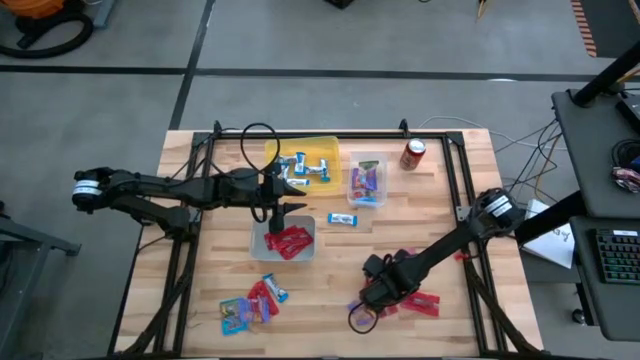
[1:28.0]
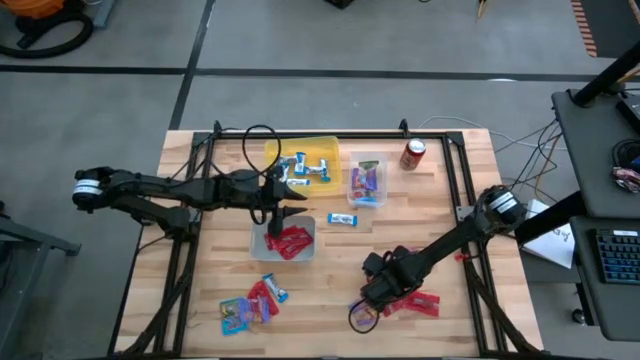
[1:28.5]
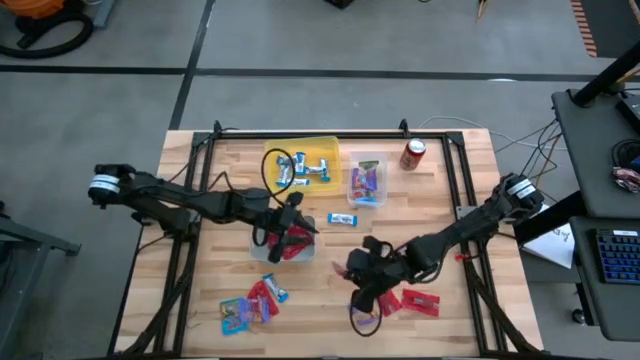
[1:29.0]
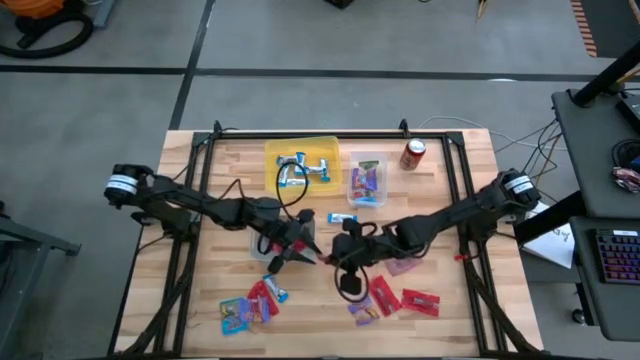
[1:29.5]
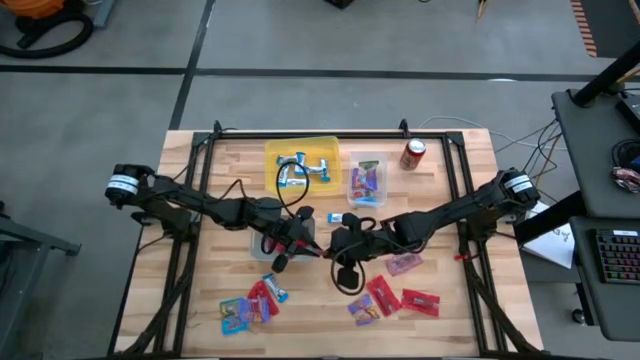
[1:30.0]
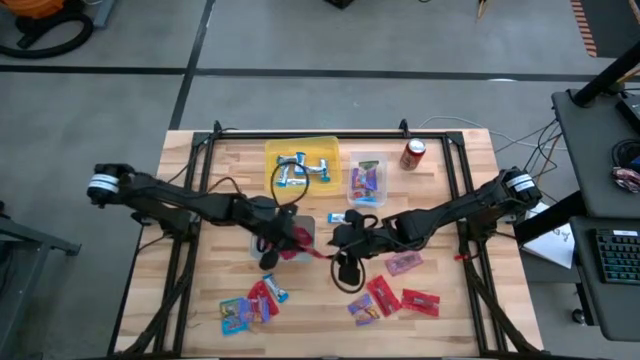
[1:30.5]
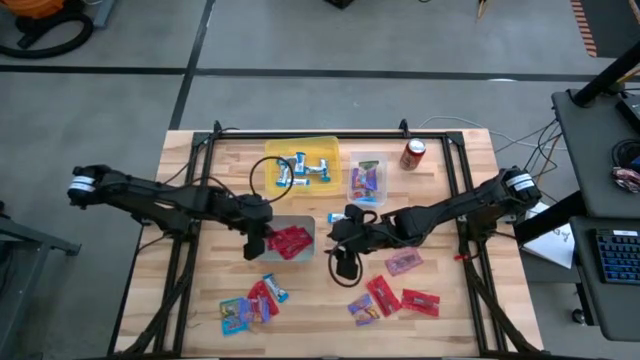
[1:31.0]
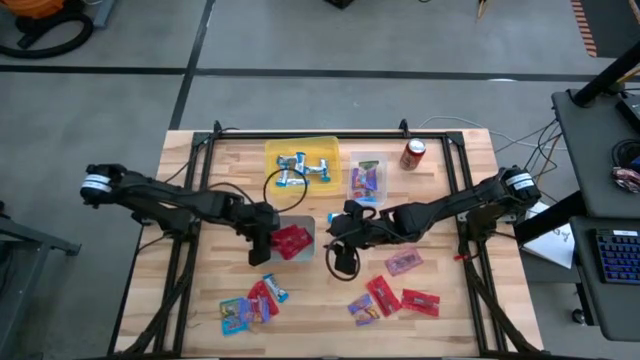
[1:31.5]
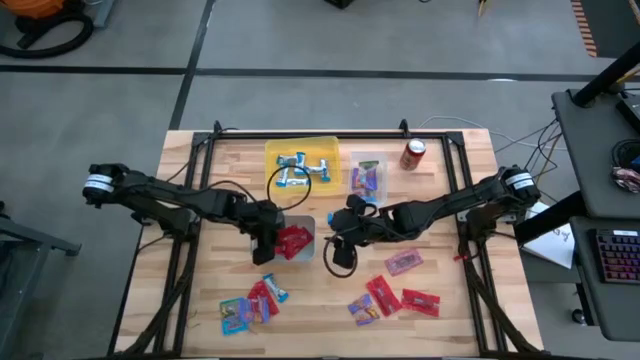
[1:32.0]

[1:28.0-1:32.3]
Task: Sort candy
Put the red candy into the gray bin

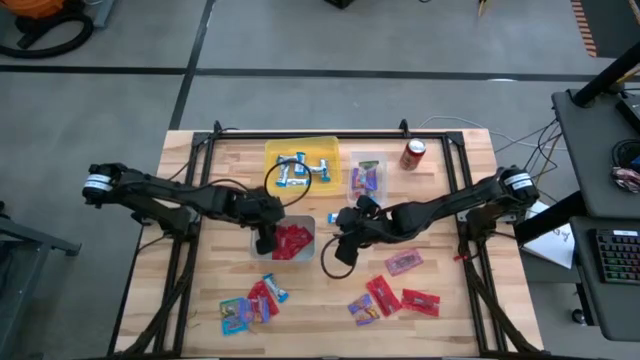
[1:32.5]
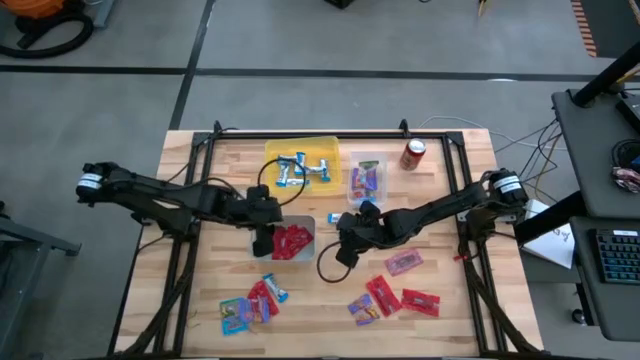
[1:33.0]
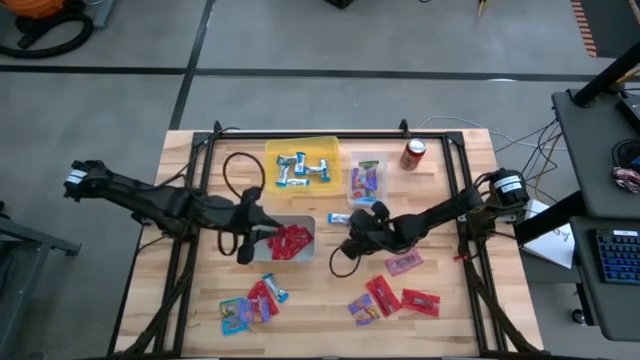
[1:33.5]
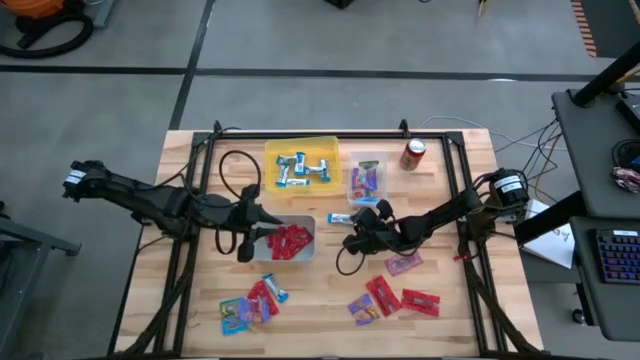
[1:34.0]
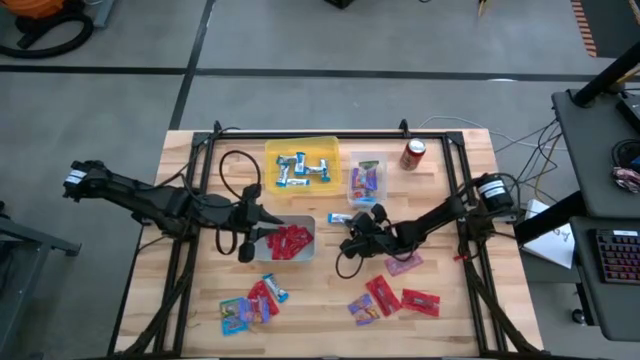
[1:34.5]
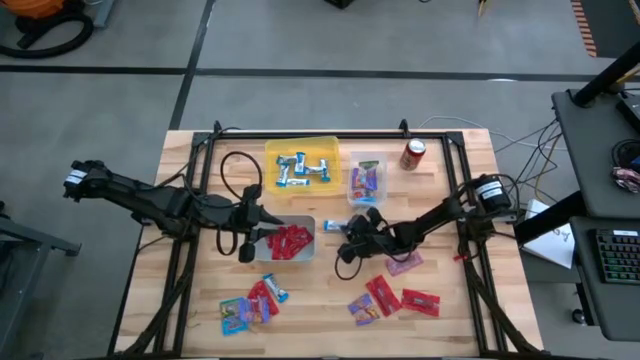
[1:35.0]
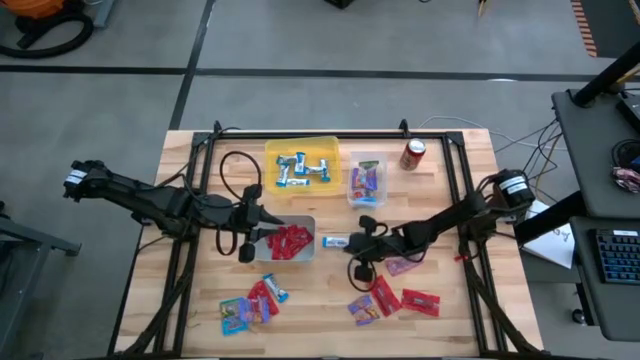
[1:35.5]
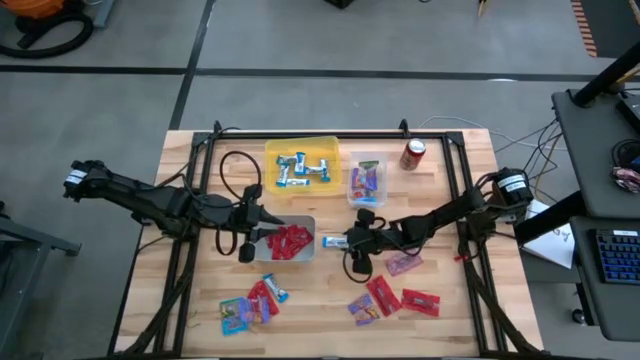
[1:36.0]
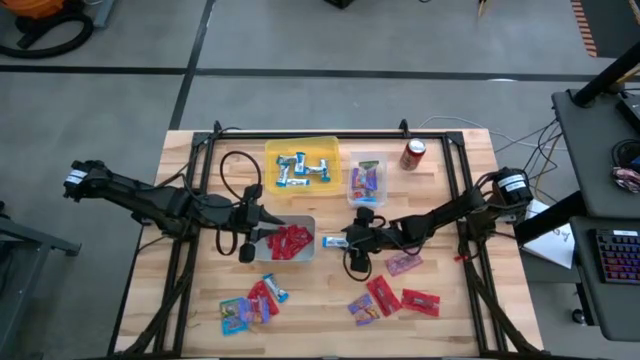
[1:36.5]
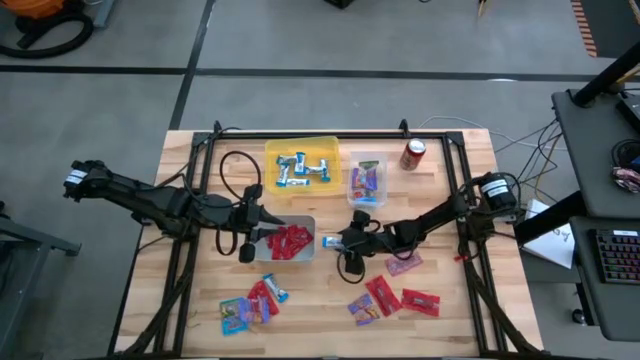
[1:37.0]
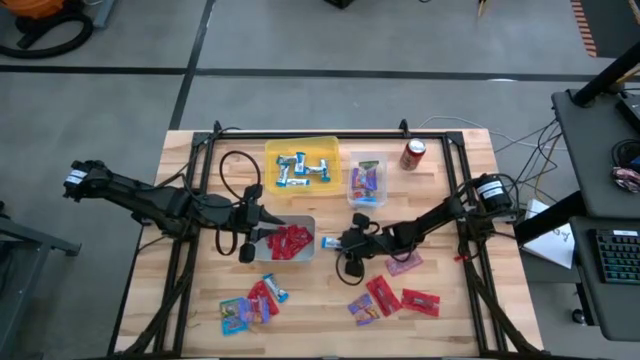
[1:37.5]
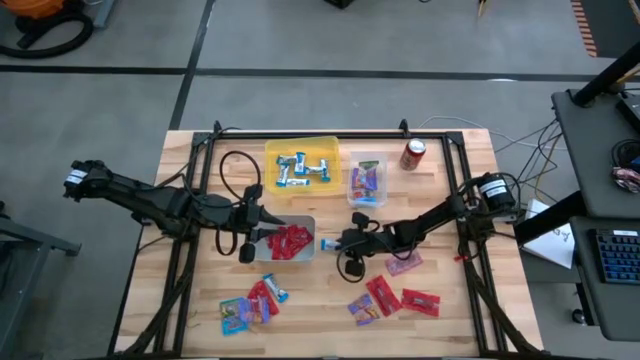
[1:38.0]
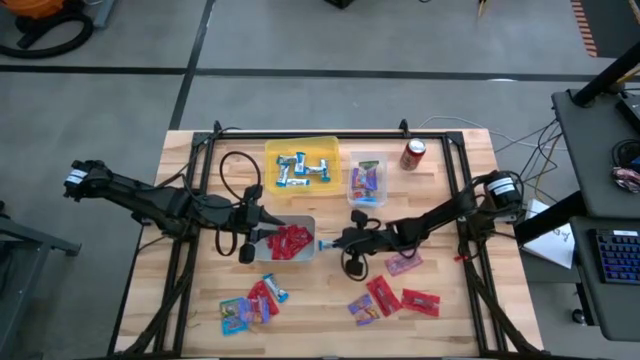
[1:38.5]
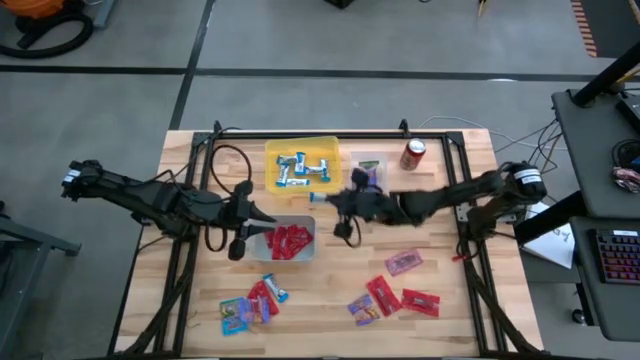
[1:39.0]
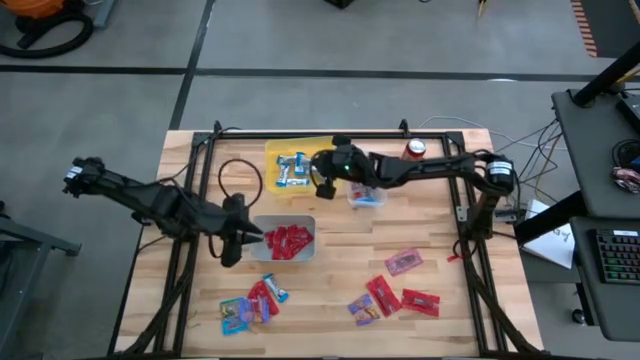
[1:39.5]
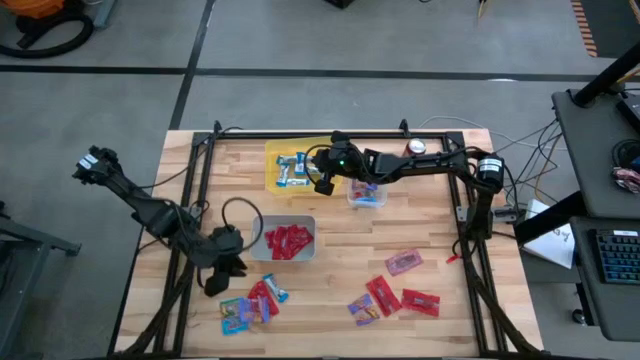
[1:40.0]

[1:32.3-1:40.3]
Put the white candy into the yellow bin

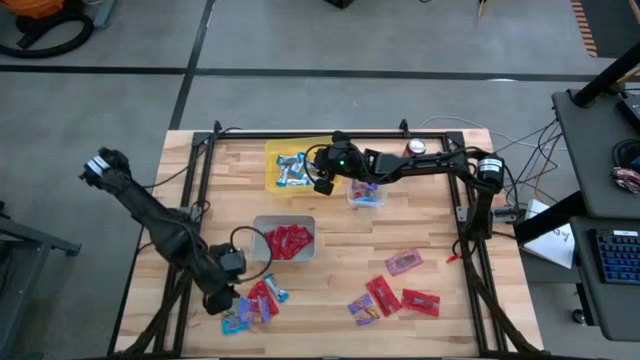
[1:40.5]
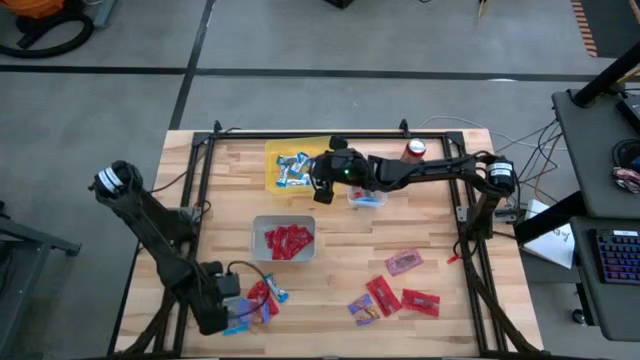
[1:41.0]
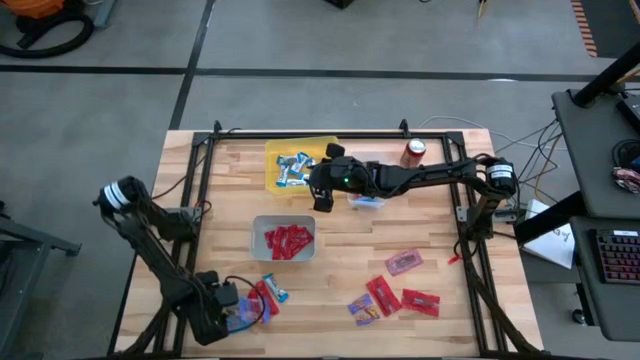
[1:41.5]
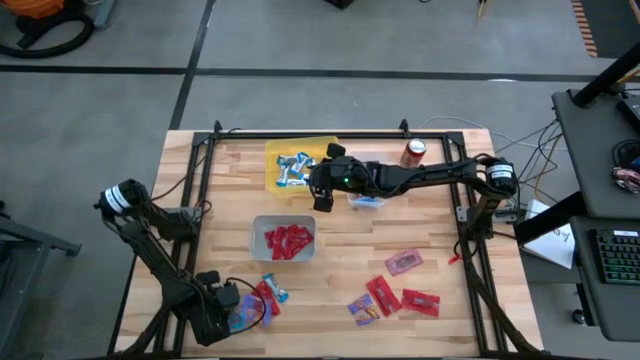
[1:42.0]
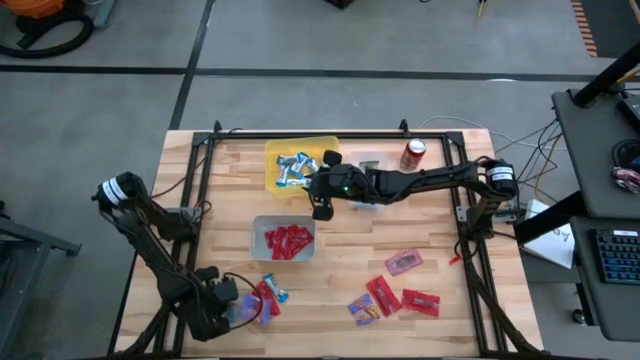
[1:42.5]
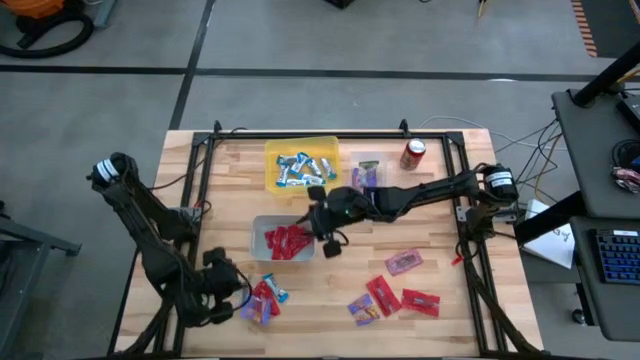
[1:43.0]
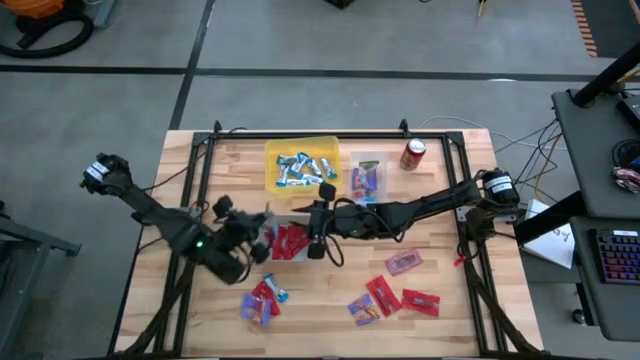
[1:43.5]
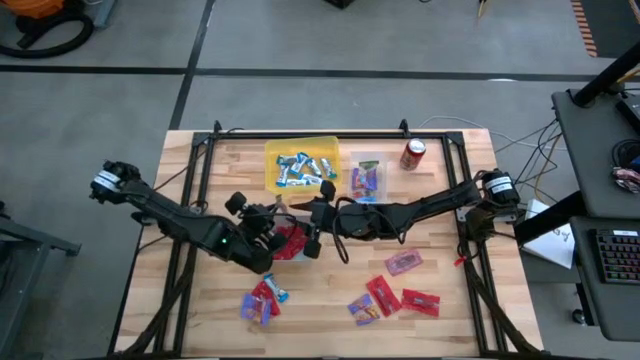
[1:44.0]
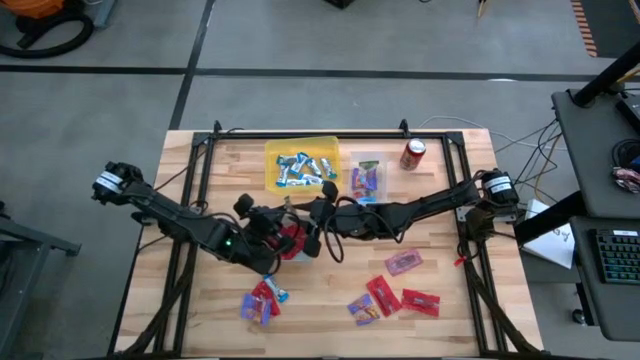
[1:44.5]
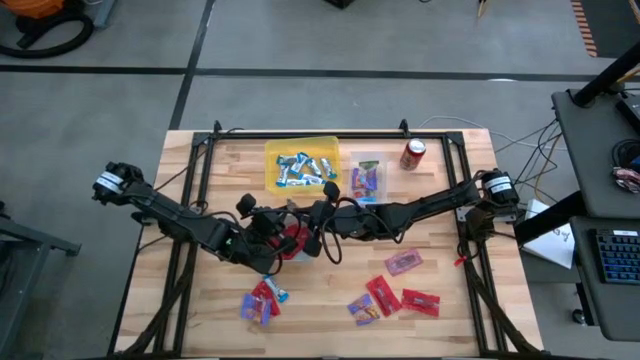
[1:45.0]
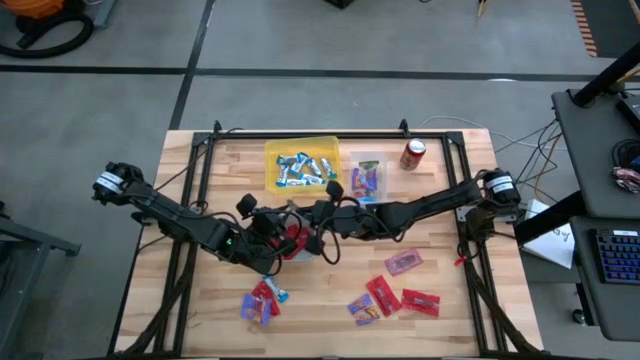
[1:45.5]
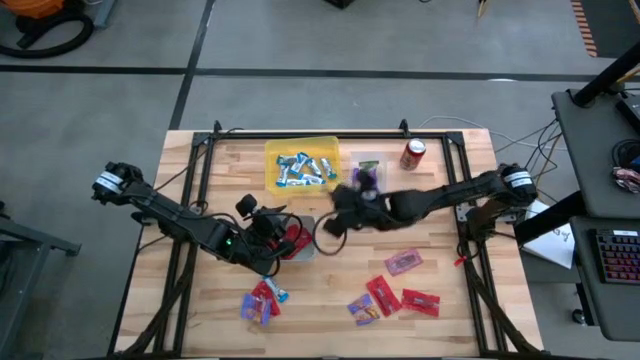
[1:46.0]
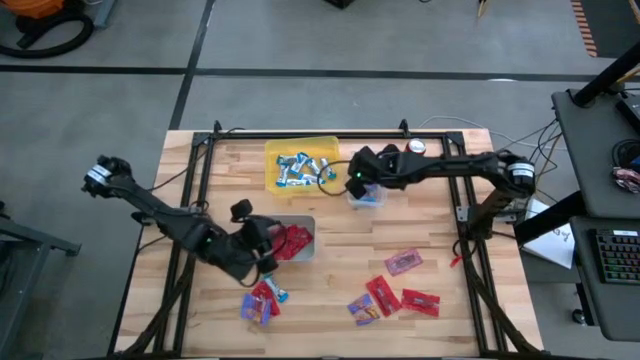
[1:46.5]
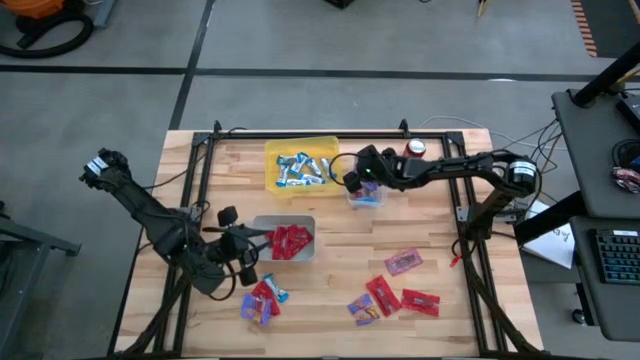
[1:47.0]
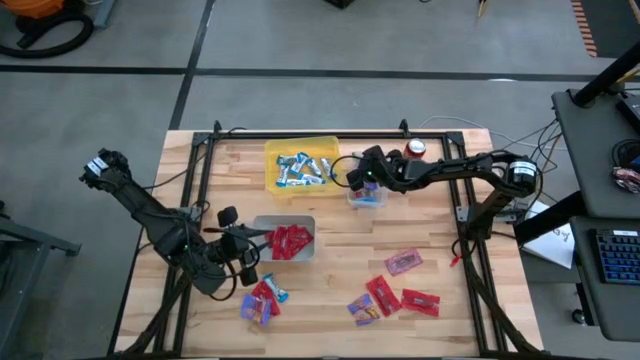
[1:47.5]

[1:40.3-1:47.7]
Put the blue candy into the transparent bin

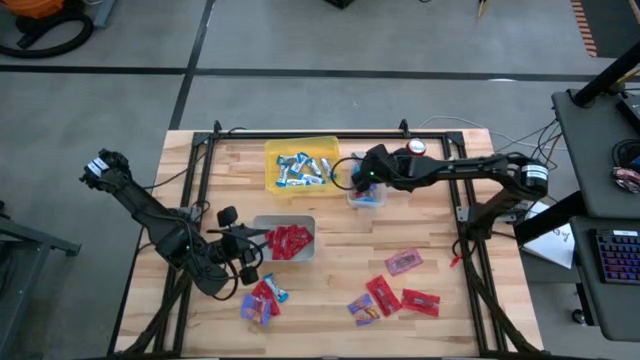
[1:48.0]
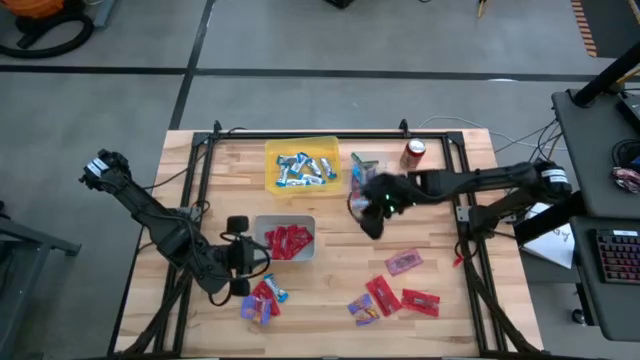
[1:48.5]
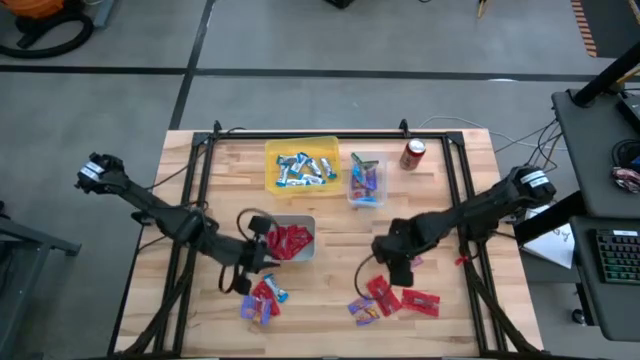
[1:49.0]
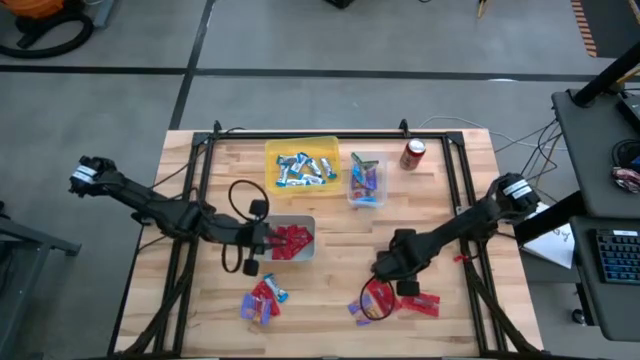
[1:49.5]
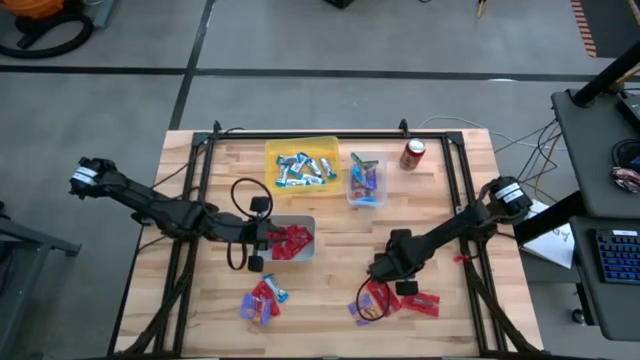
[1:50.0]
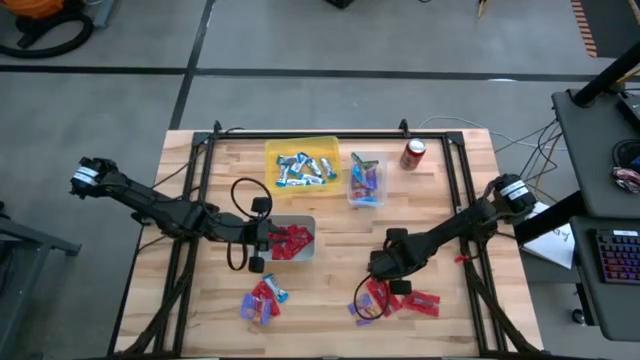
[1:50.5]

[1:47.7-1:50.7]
Put the red candy into the gray bin
